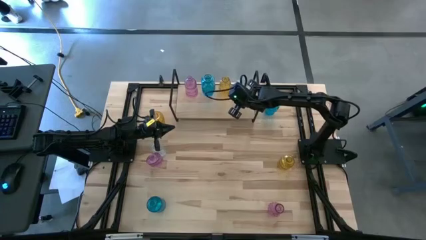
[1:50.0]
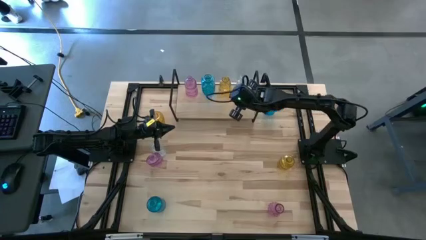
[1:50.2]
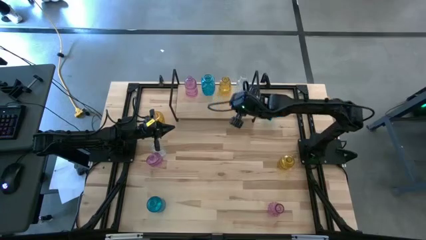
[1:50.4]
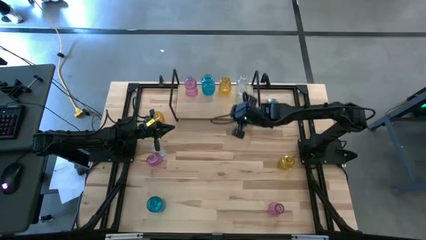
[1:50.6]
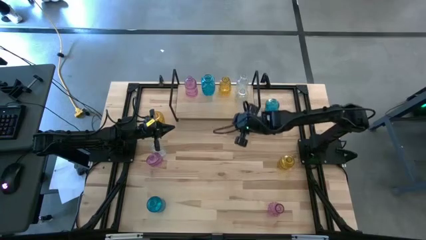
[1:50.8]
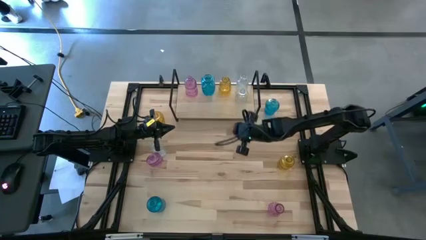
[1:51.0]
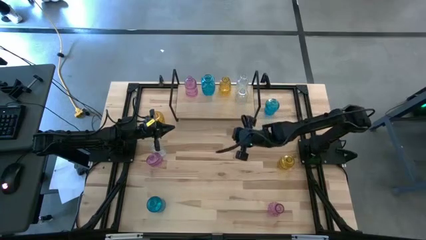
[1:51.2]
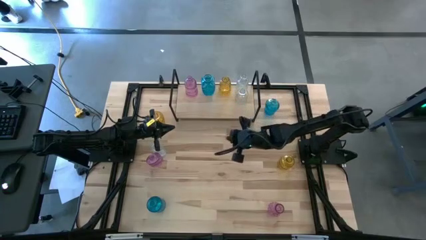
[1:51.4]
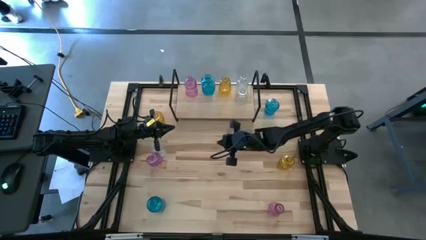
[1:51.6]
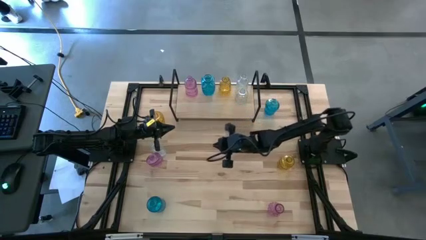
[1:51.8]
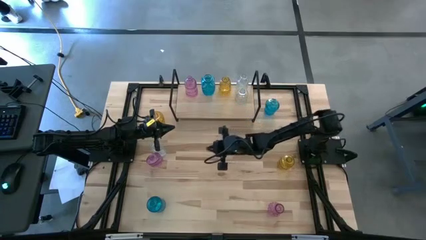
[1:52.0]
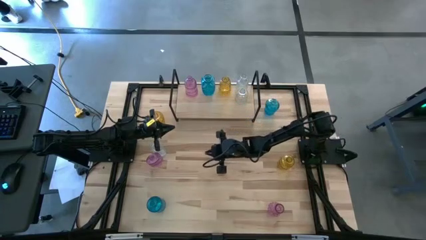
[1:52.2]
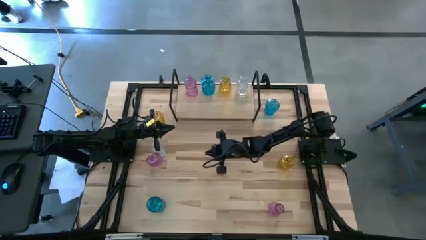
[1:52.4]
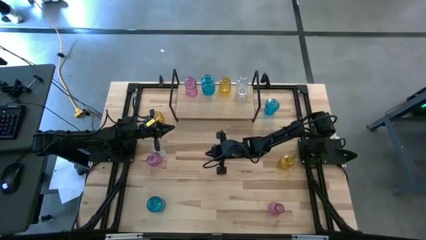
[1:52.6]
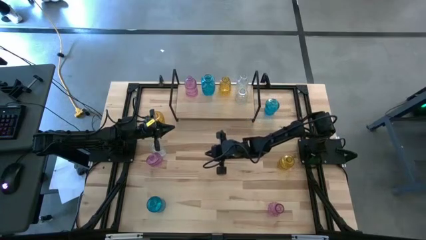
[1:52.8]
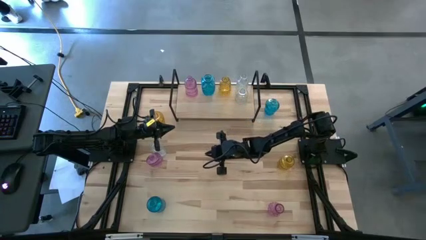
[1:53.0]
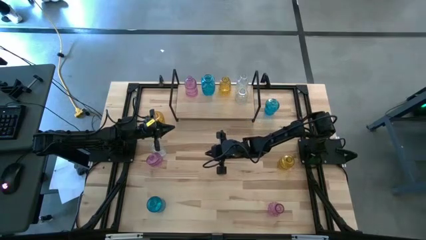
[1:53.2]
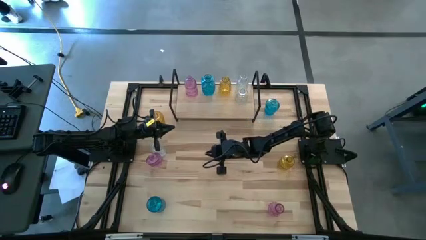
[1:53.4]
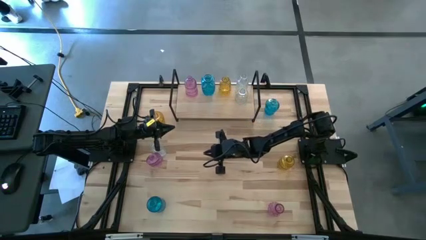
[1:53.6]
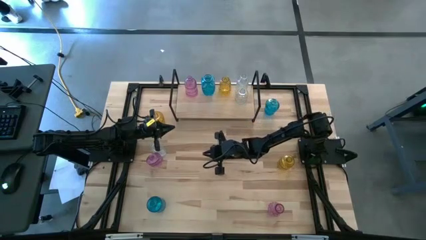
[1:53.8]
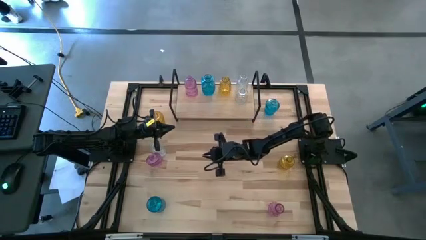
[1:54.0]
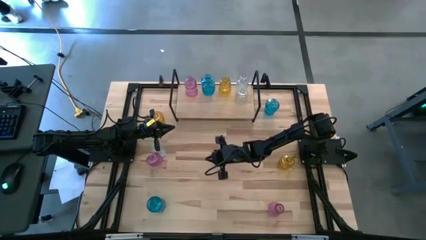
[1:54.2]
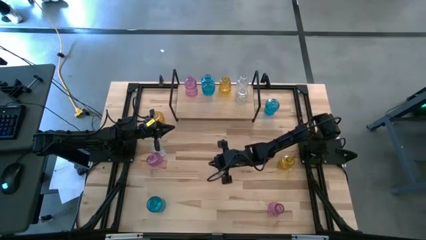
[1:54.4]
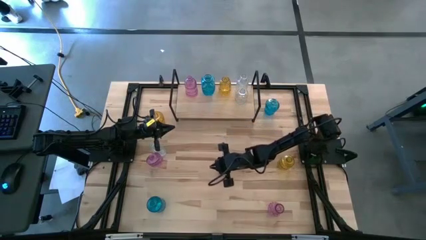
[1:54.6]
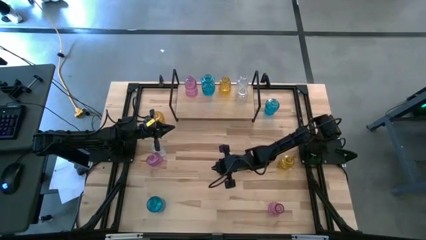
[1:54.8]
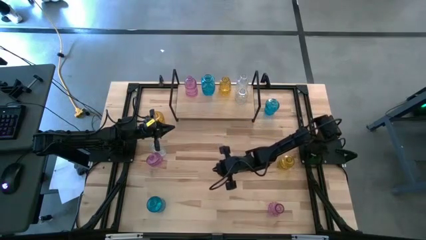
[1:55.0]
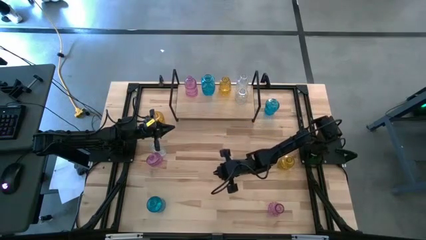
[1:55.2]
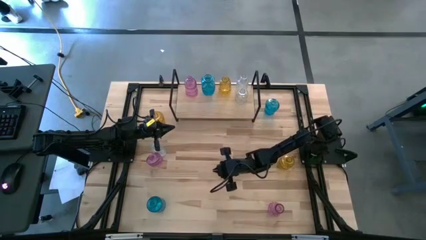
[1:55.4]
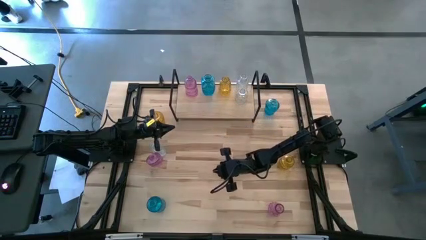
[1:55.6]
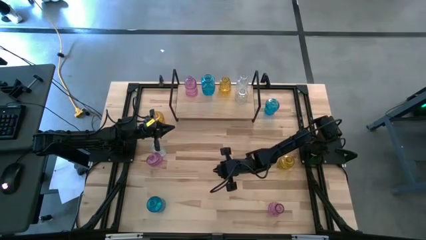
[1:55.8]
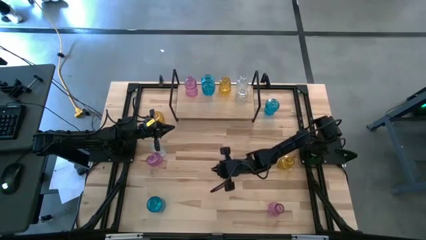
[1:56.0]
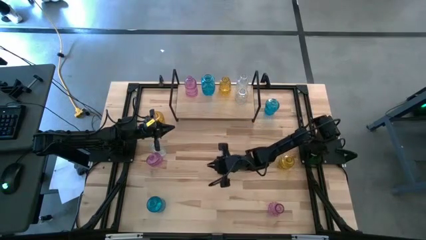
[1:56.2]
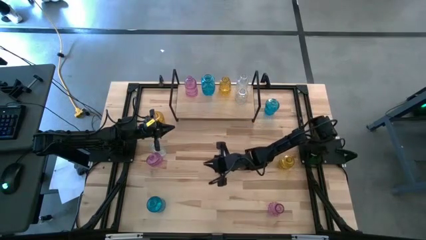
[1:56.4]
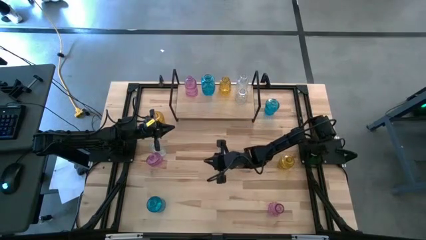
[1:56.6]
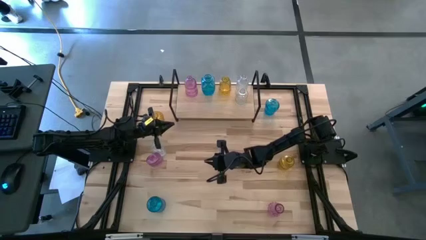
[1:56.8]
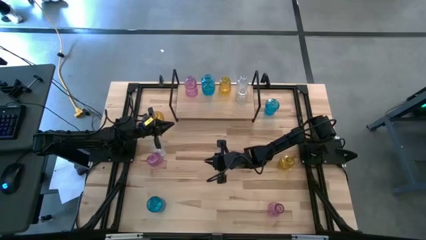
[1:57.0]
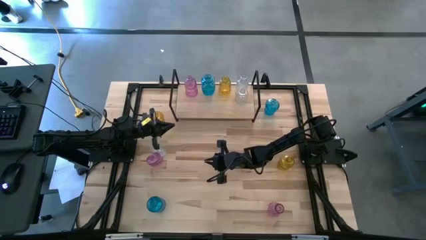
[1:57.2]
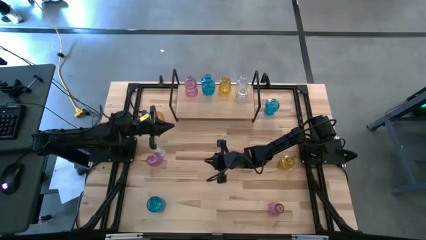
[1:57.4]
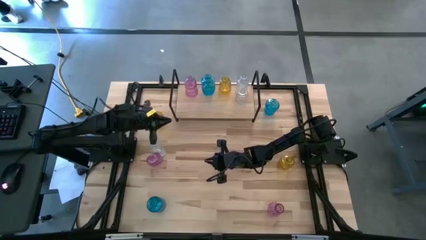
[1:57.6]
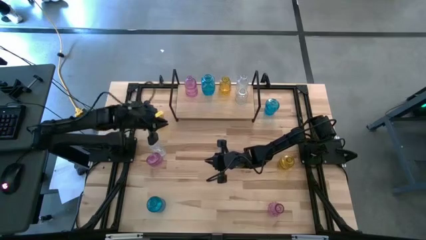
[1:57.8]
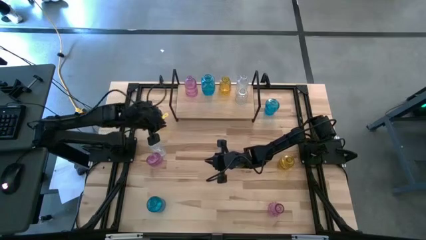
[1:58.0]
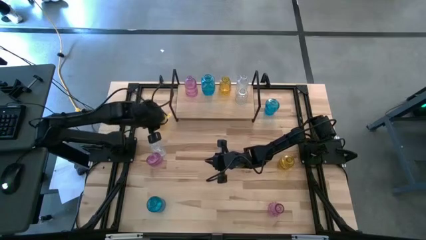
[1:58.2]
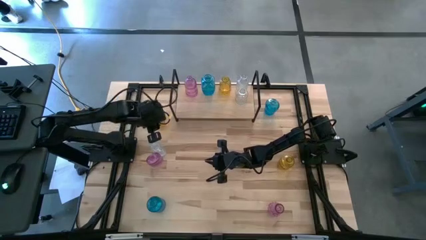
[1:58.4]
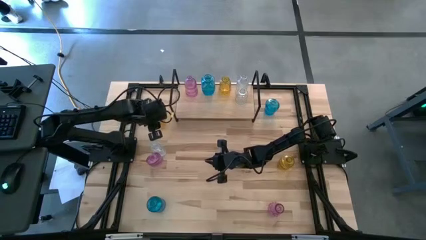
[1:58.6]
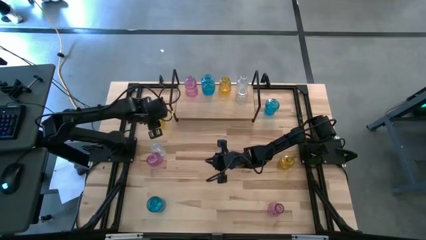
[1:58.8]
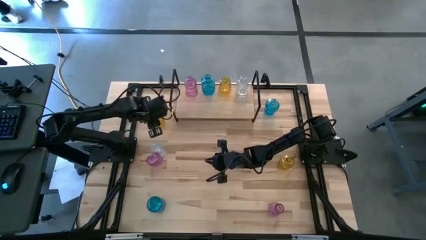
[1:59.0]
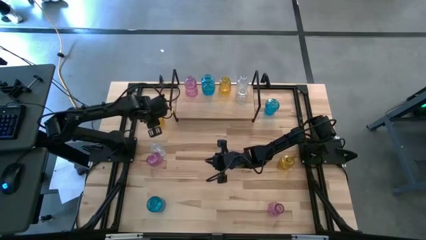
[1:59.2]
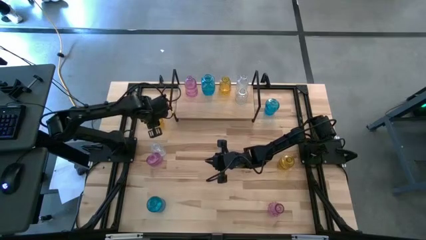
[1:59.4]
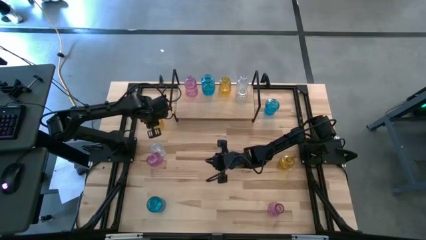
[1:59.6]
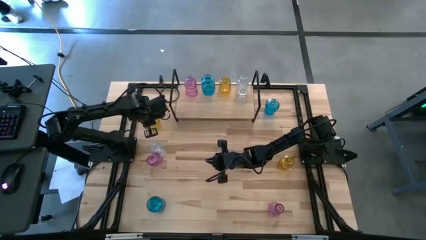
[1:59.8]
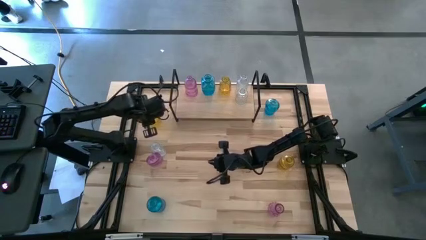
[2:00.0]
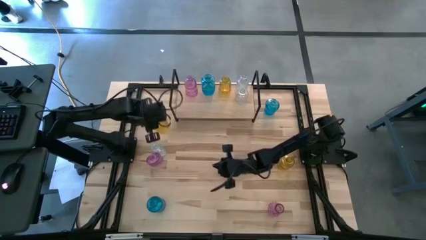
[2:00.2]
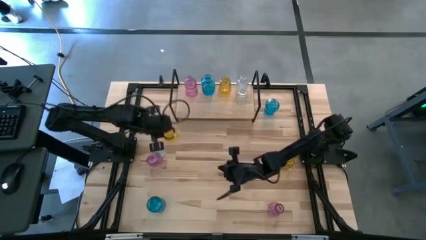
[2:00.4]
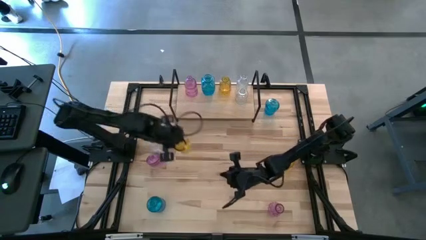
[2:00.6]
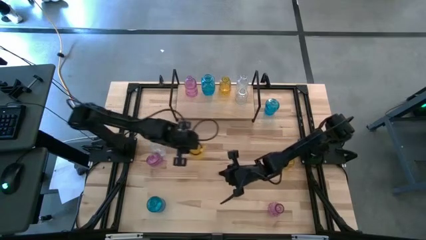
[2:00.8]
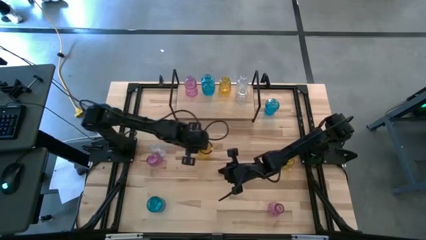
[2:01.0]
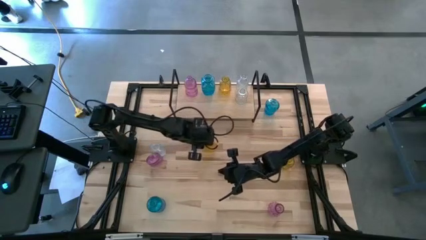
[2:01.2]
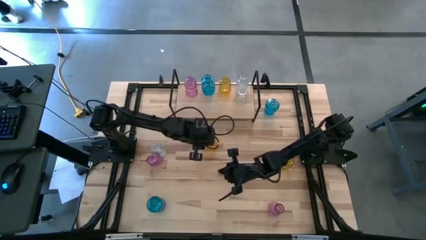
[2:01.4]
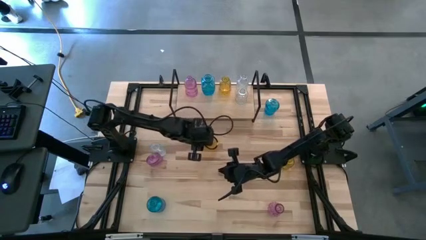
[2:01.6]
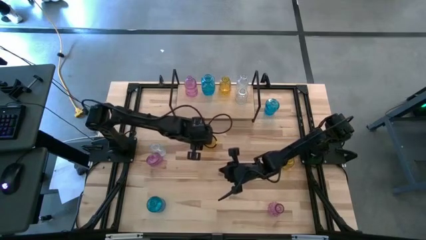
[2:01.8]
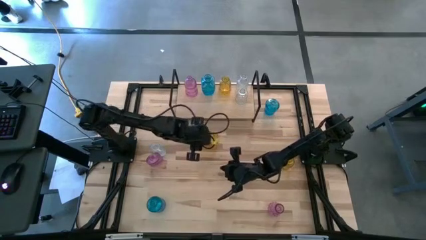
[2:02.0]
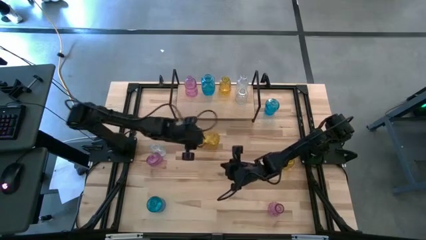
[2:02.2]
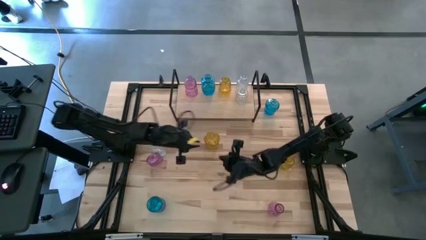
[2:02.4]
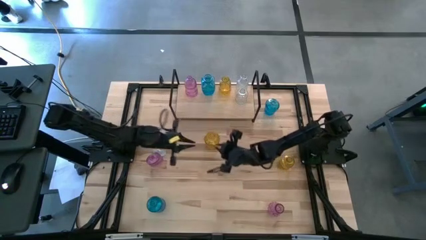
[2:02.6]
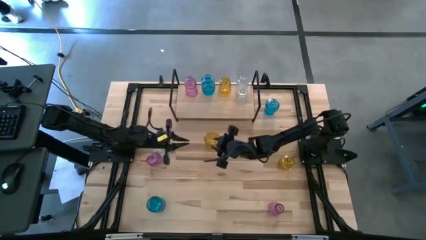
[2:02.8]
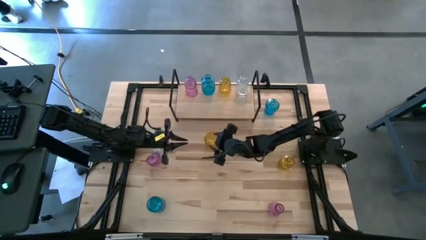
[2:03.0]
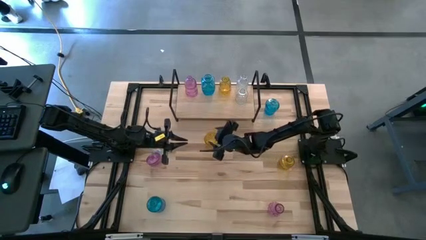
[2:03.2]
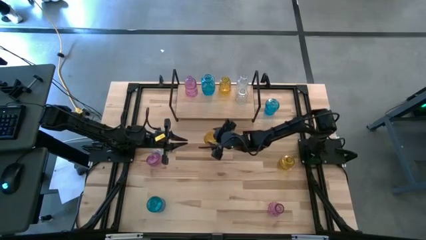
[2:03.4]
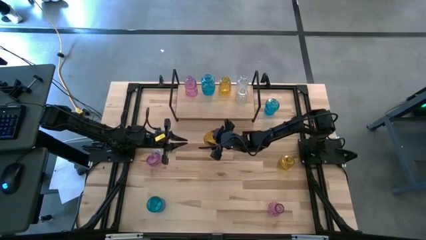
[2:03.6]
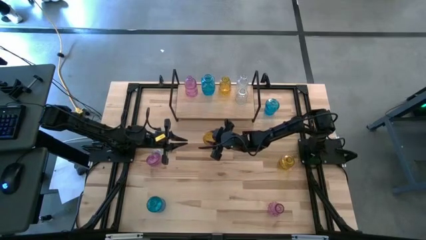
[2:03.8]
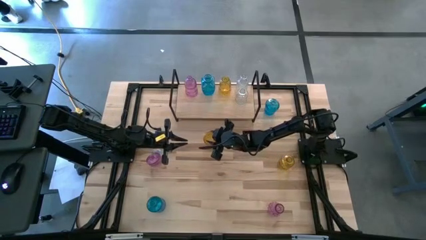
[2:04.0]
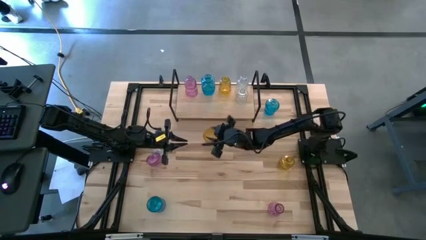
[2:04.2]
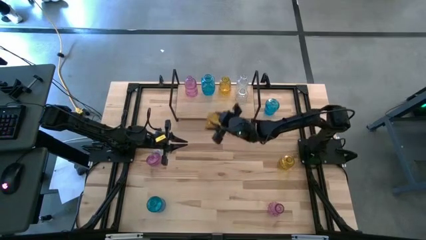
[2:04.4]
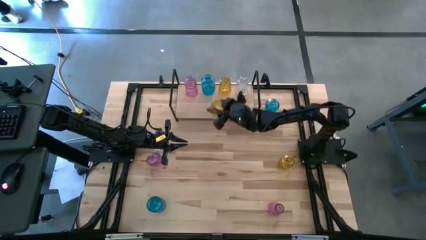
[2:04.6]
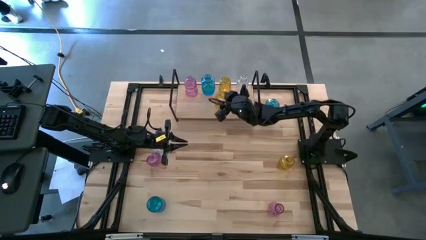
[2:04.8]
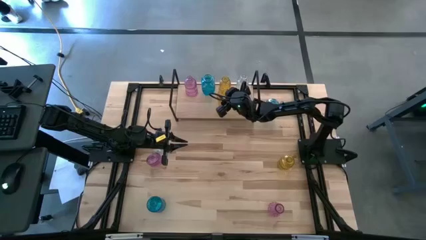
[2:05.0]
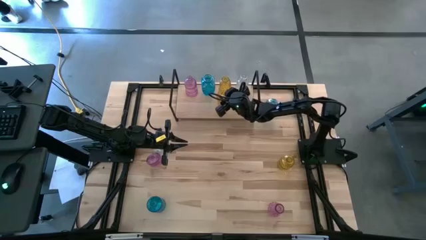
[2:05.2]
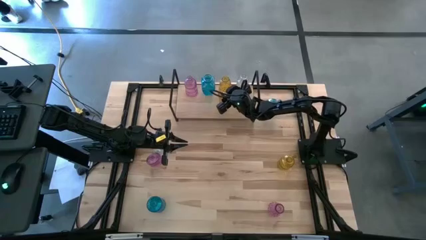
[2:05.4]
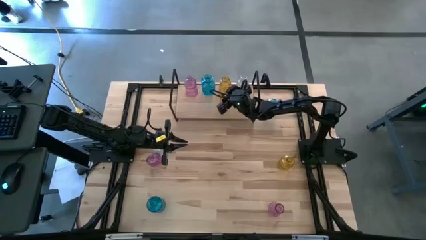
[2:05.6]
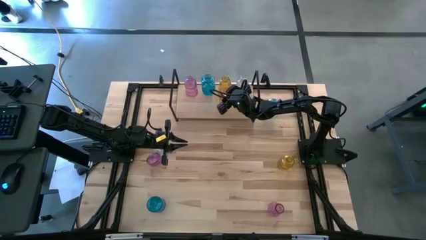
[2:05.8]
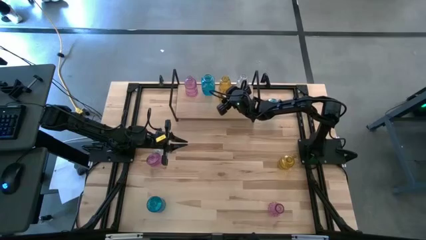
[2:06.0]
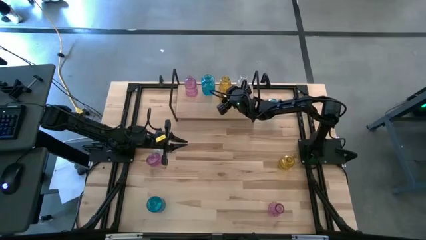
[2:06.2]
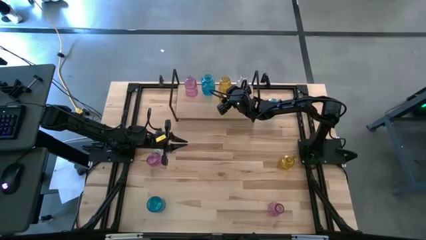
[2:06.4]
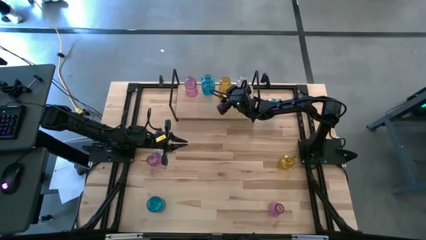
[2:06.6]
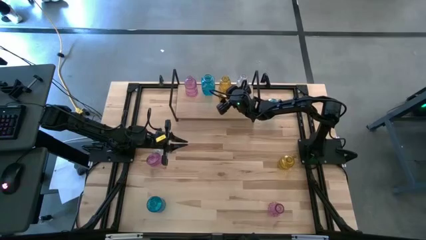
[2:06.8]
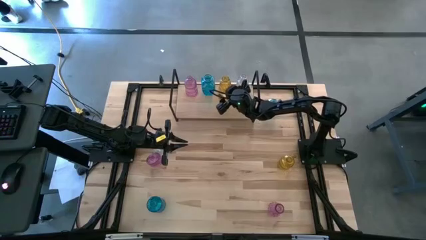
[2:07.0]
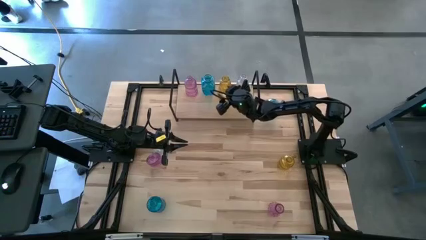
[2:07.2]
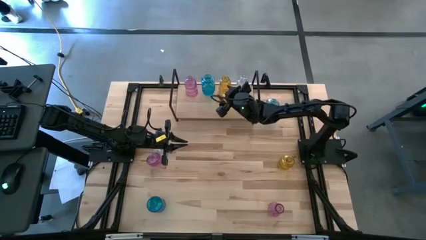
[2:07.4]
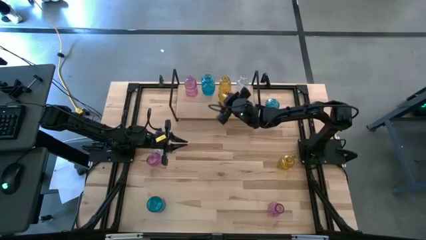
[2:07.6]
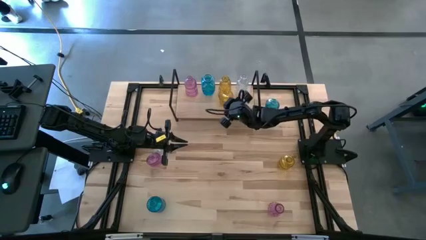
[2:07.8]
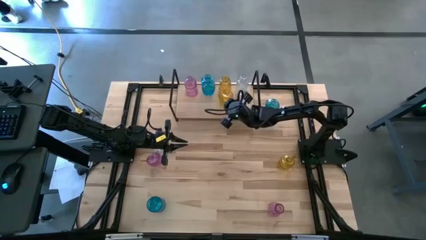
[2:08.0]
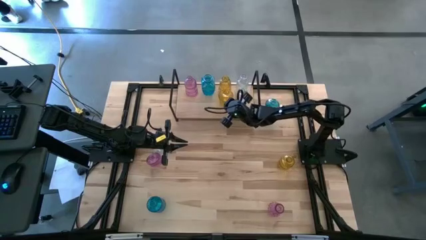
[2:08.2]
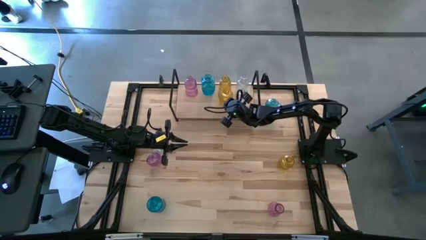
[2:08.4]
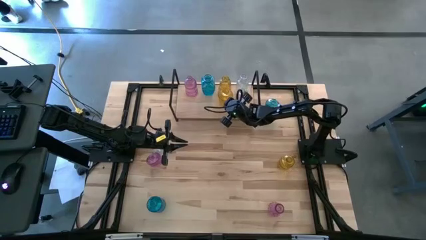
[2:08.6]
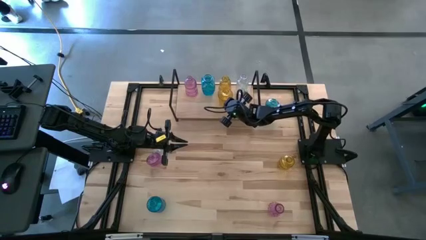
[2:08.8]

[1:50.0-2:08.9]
Task: sort vases onto shelf
Put the left yellow vase on the shelf aligned with the yellow vase
